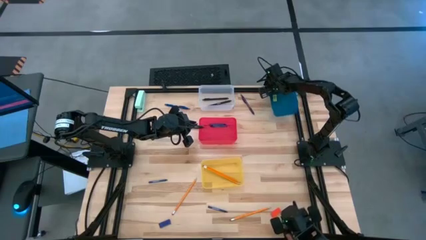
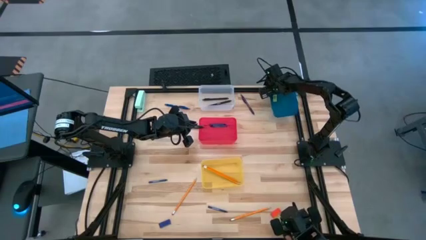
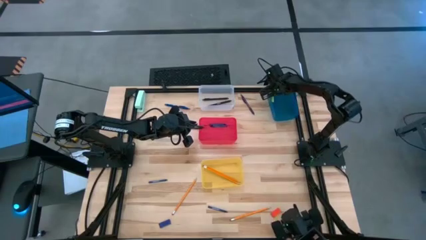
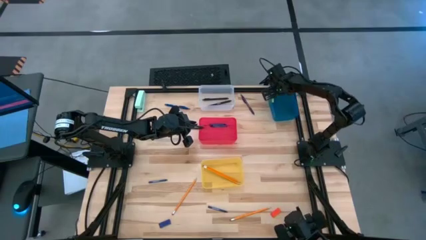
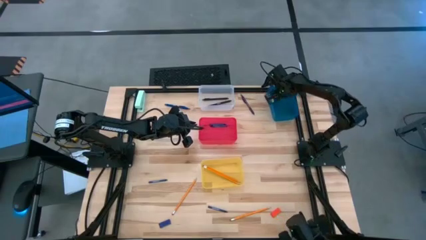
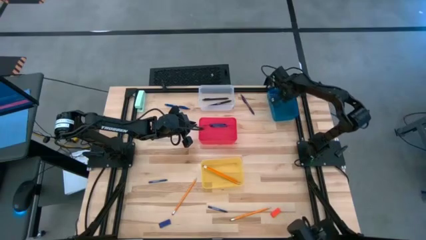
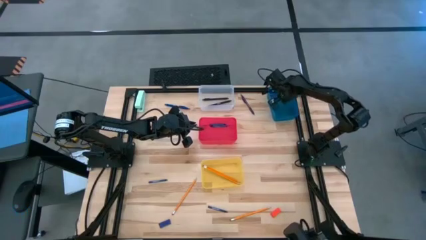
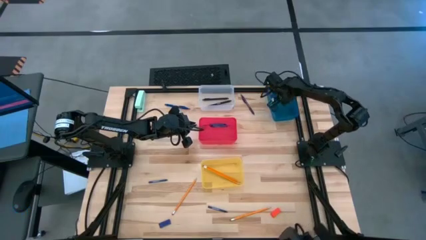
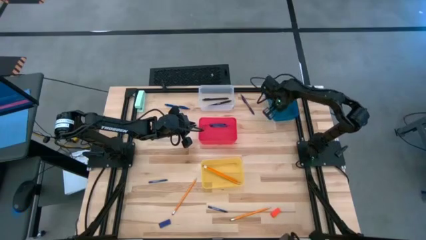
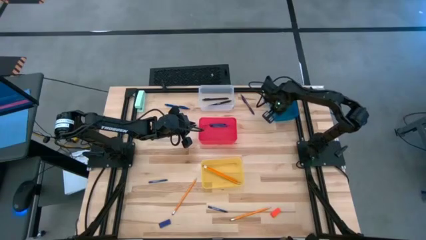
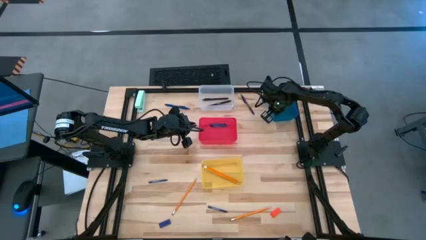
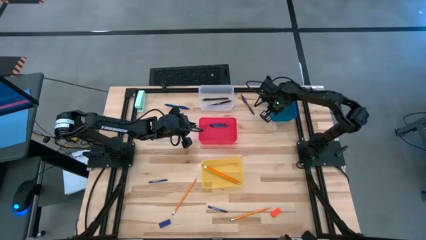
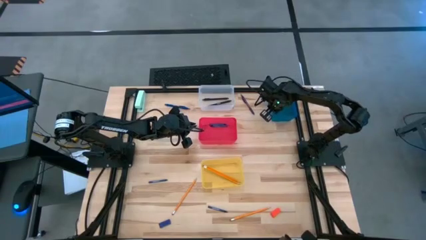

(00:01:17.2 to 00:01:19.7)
Task: Sort crayons/erasers/pens/pencils in bins
Adjust the blue bin on the table

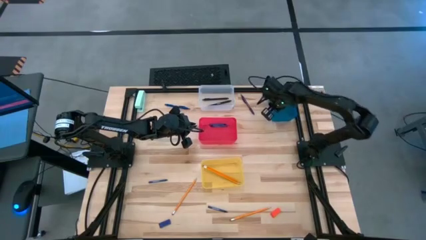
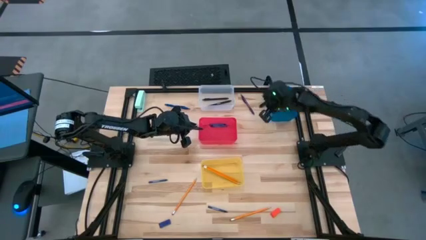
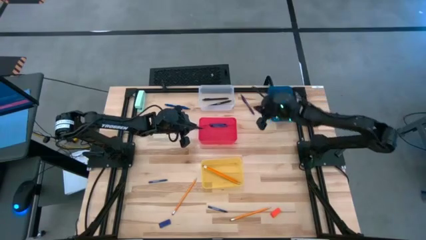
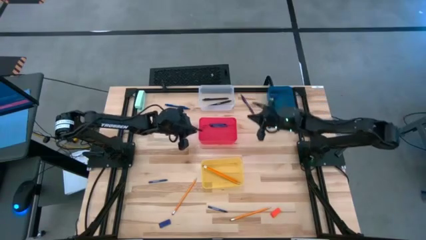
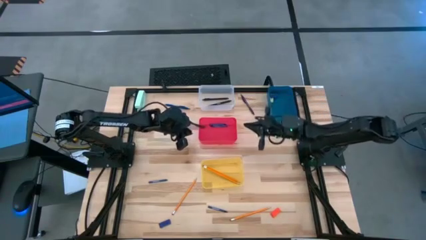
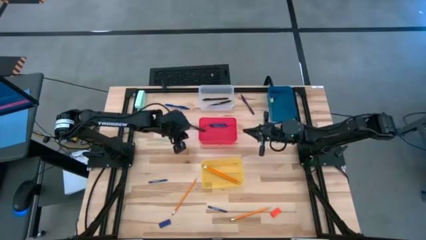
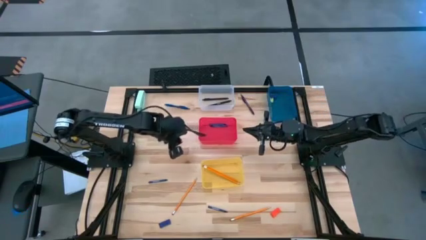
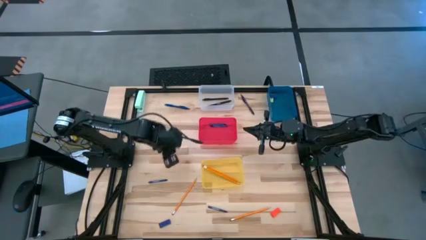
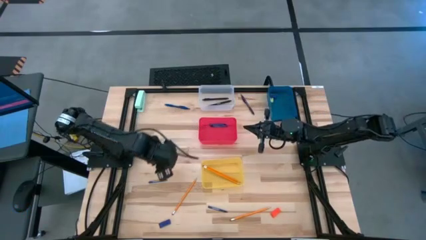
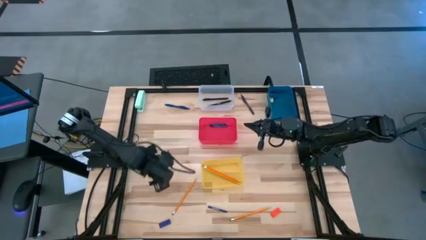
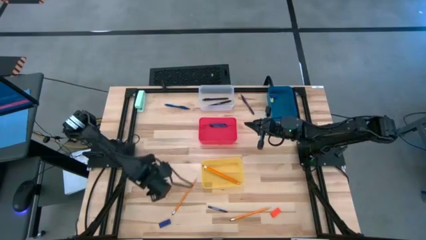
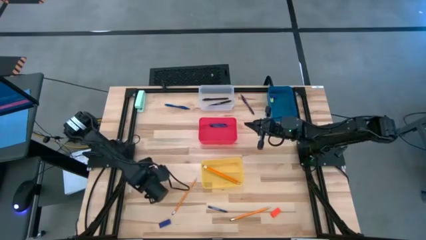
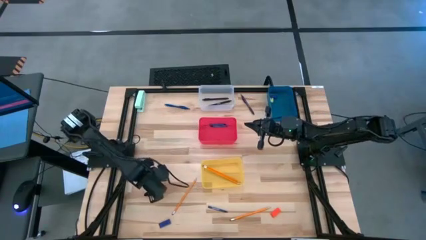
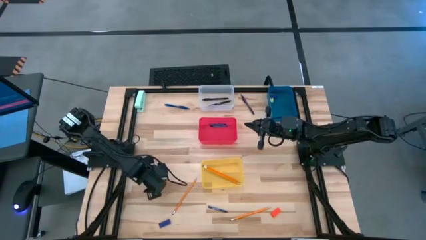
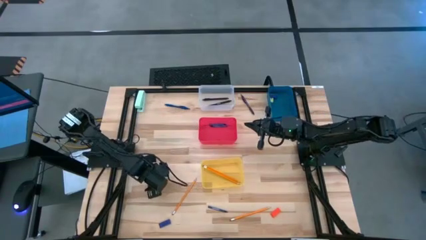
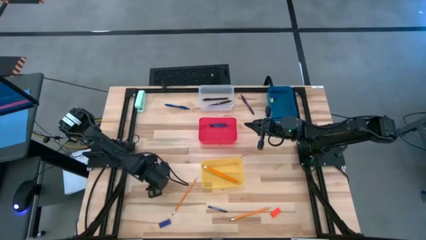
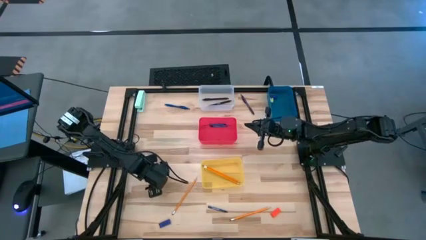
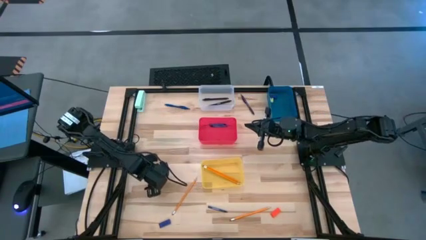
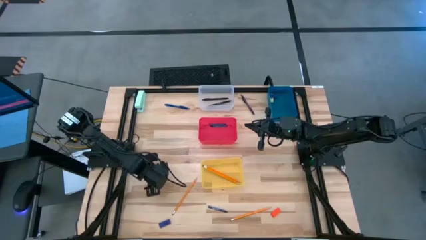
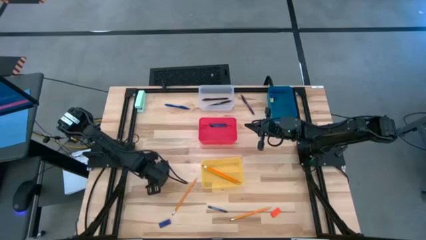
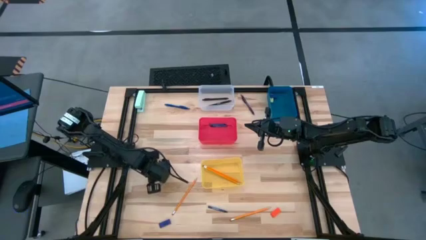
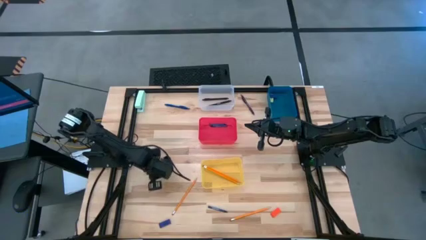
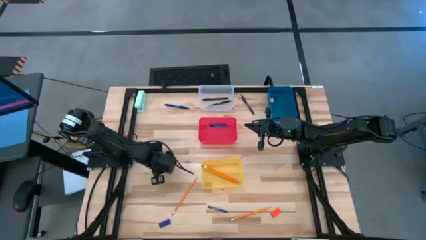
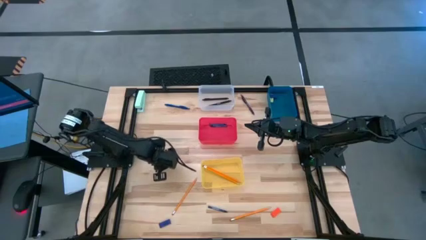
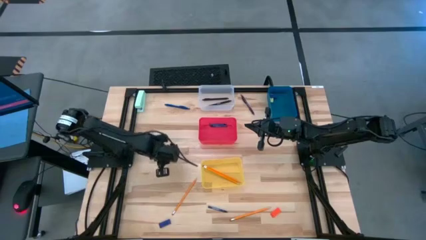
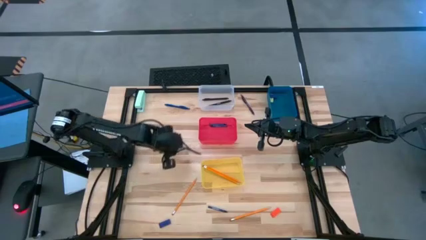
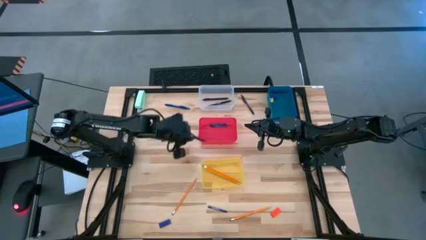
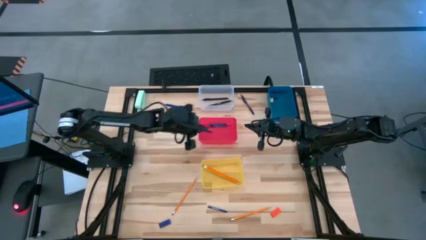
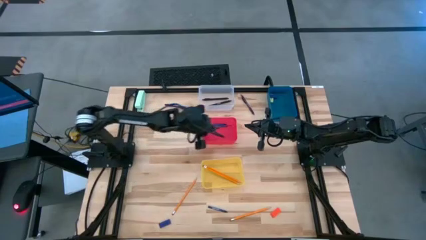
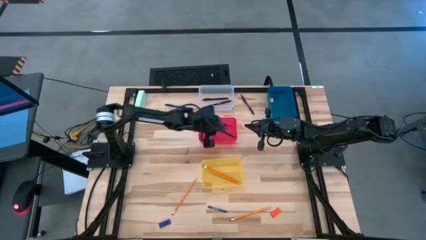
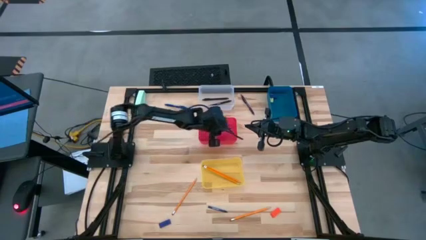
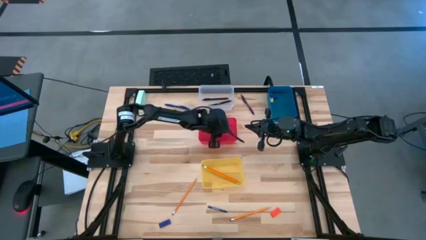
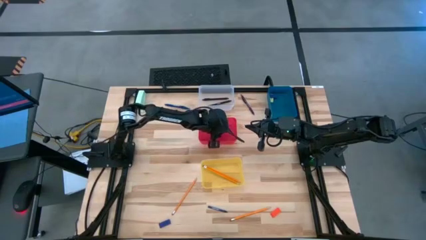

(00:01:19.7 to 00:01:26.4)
Put the top blue crayon into the red bin

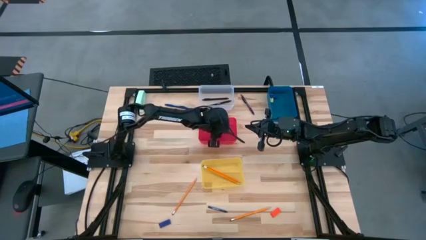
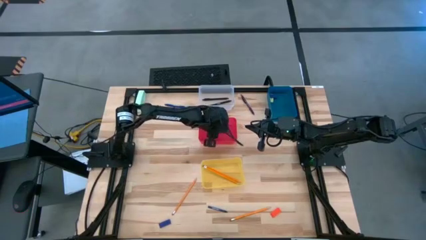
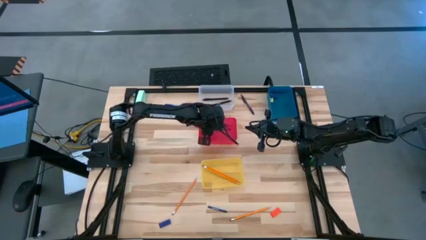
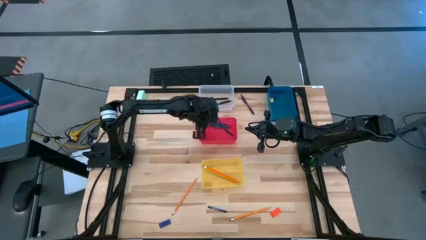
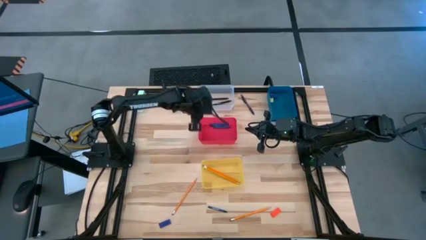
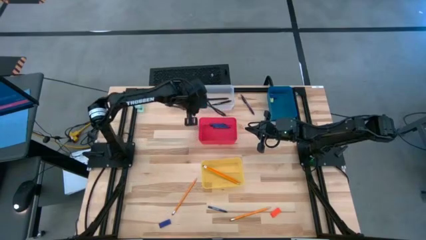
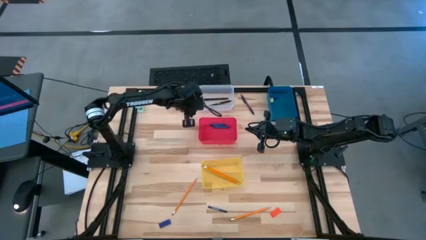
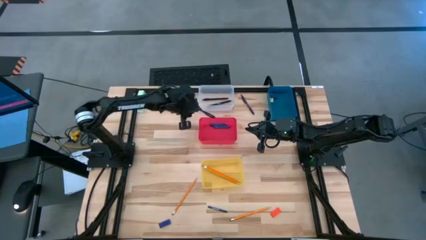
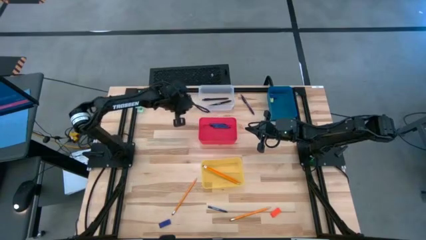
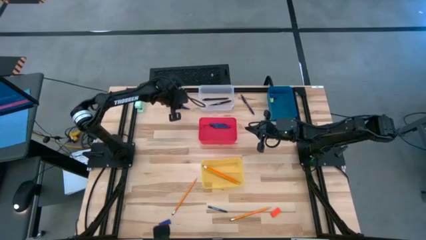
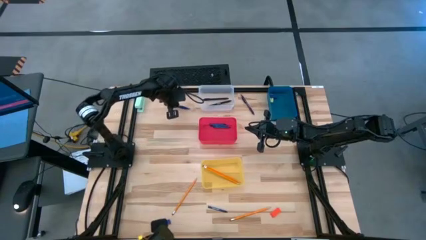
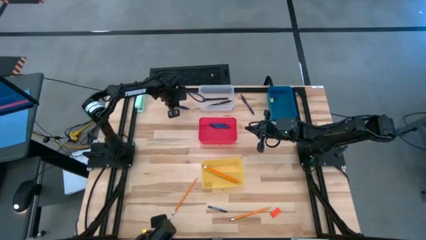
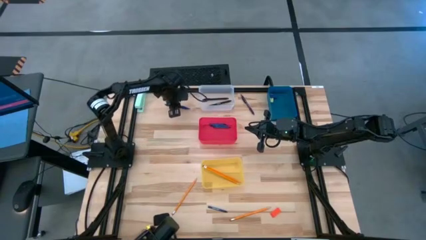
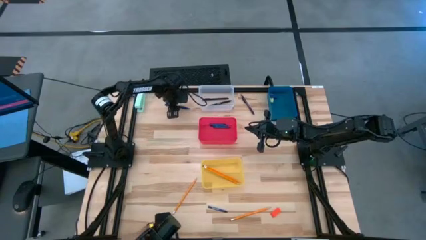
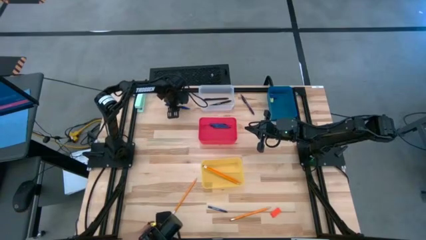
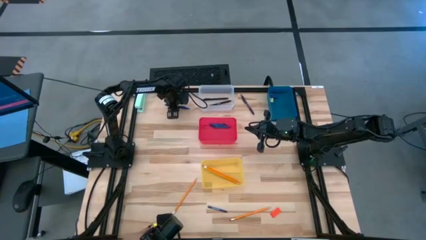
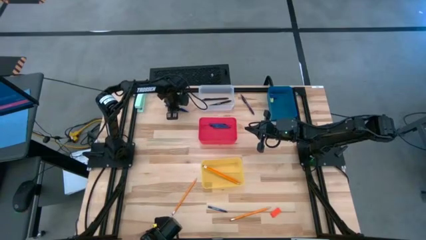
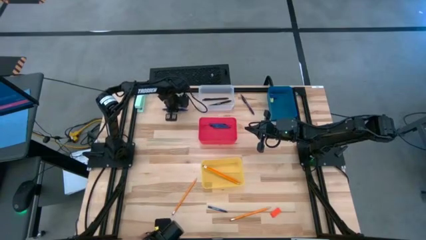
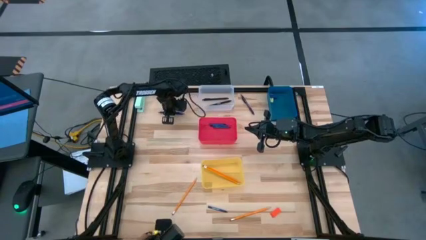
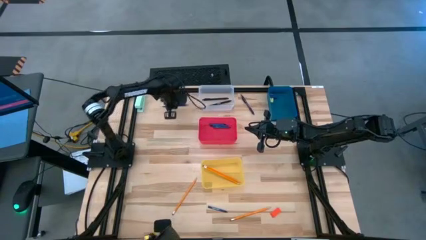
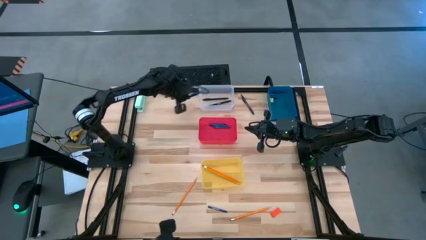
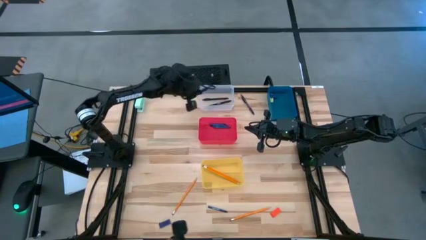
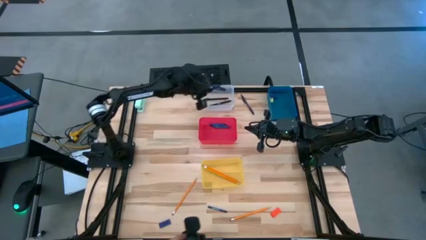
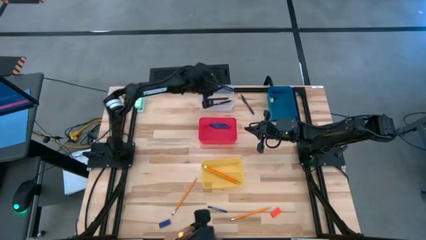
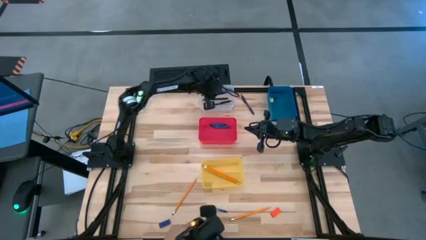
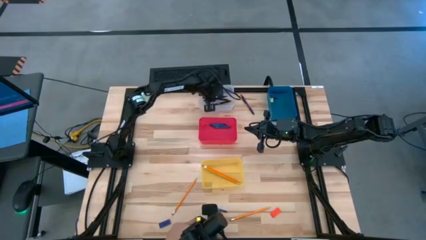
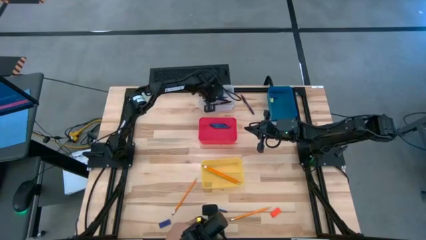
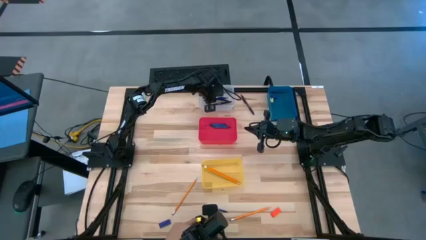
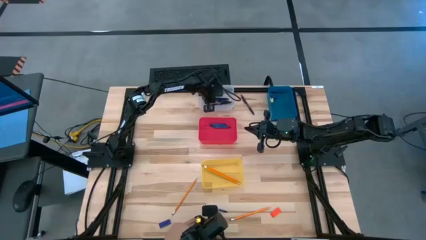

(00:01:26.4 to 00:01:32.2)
Put the blue ballpen into the transparent bin
